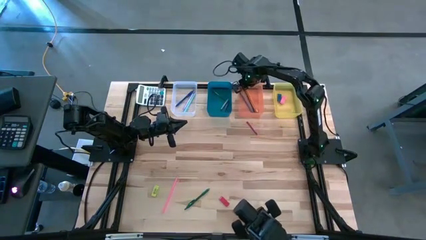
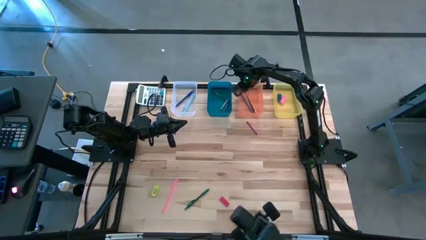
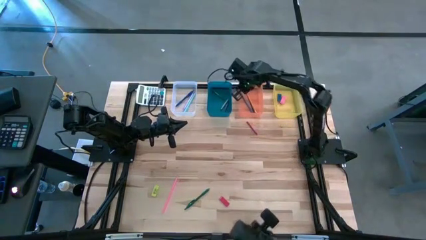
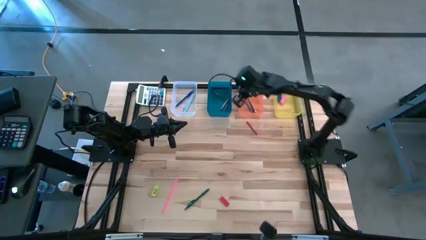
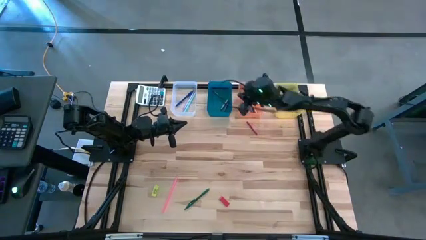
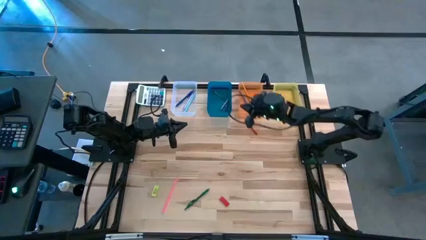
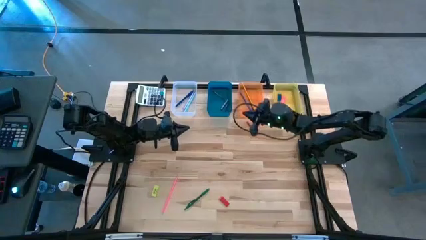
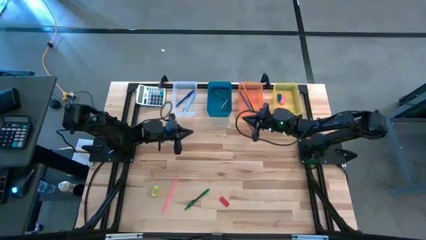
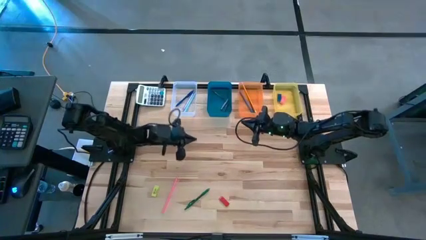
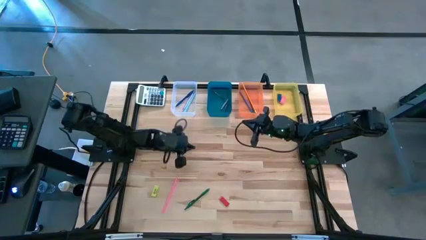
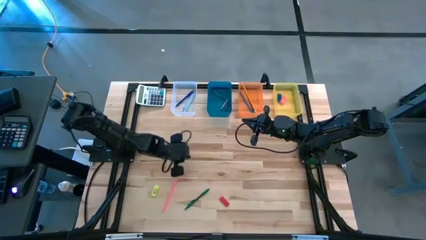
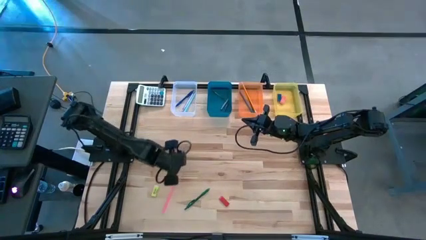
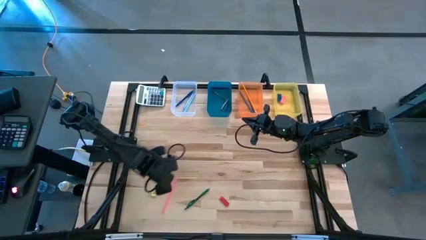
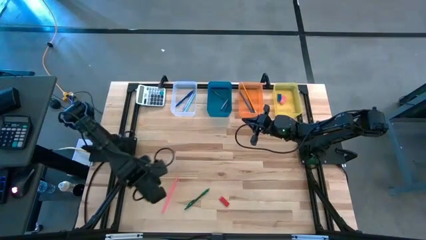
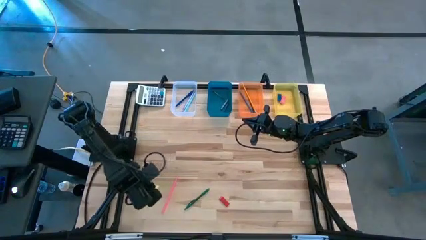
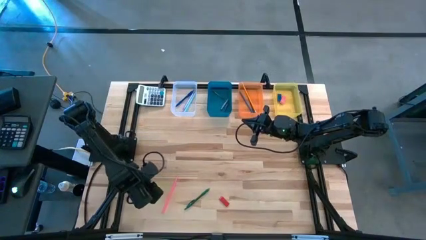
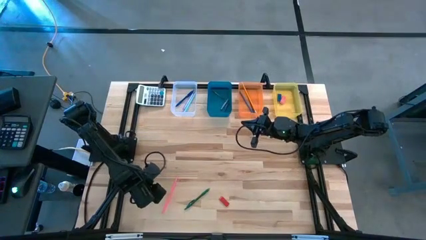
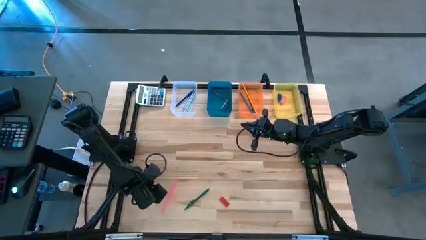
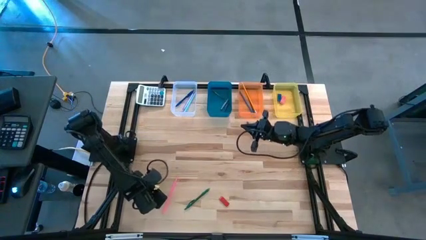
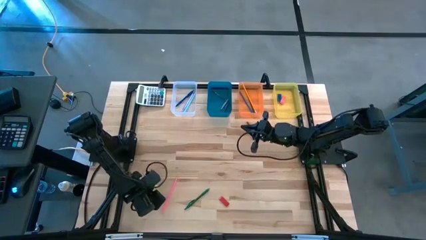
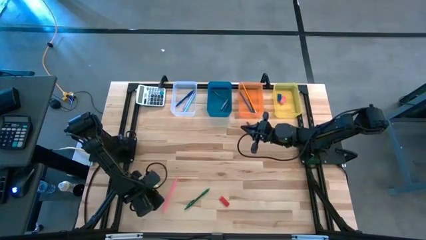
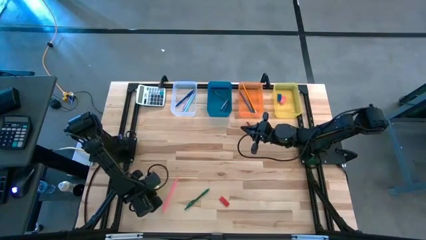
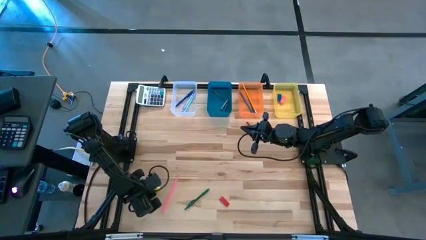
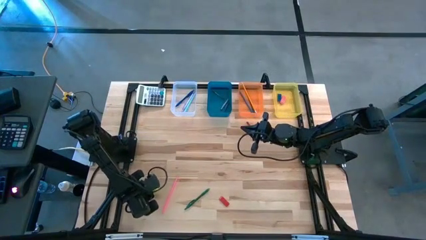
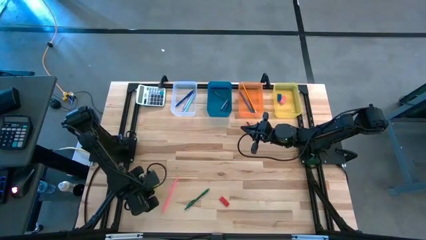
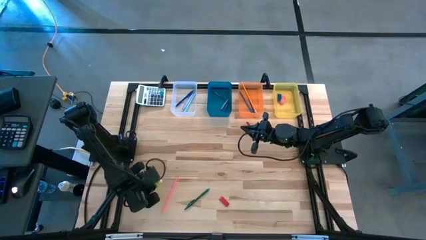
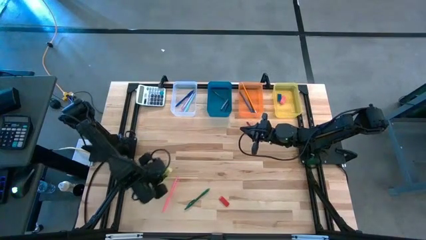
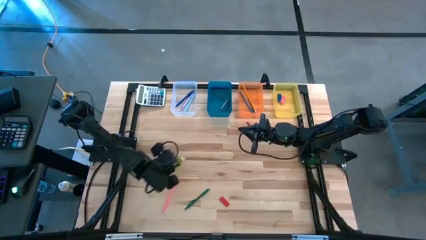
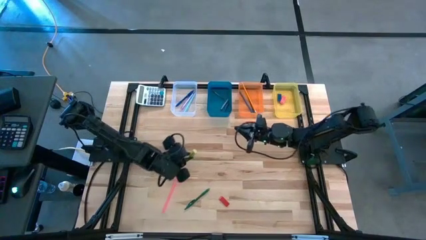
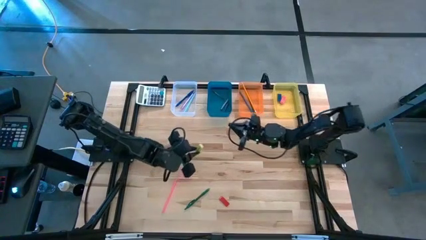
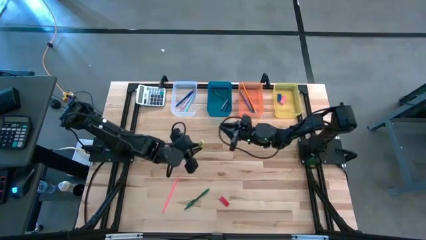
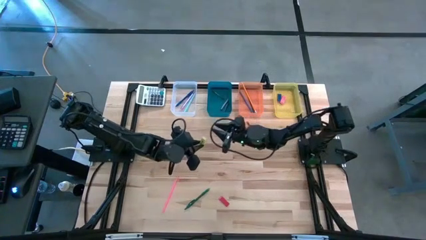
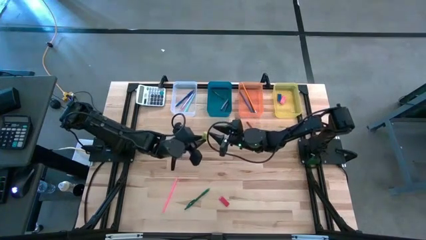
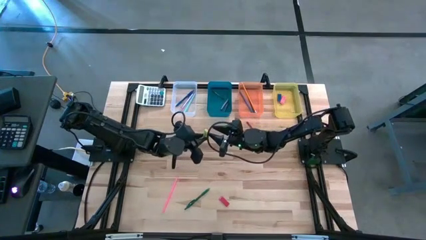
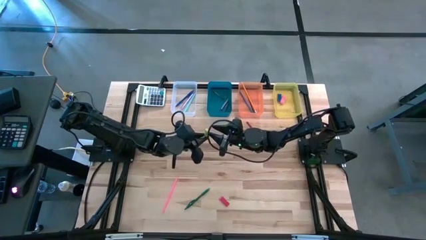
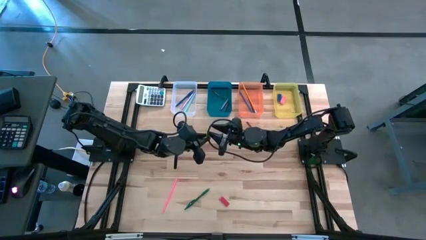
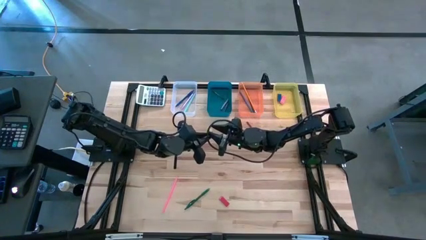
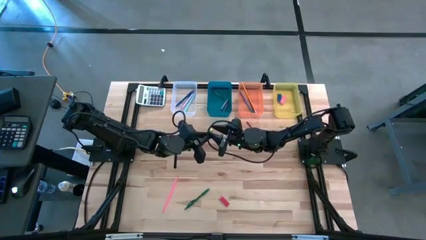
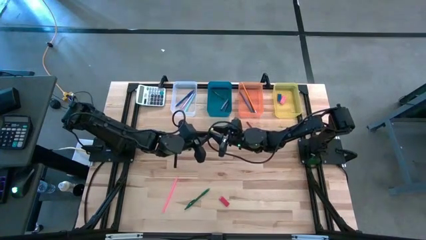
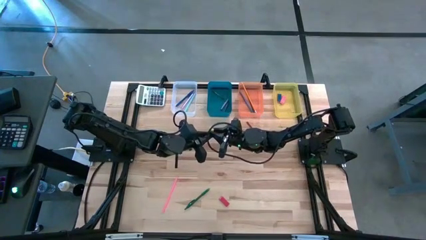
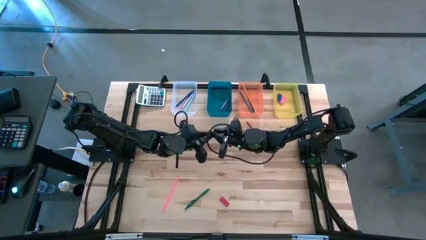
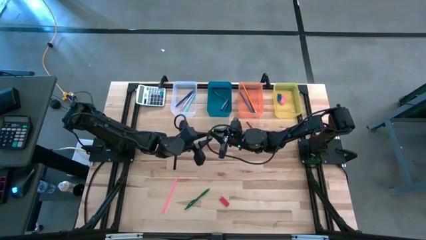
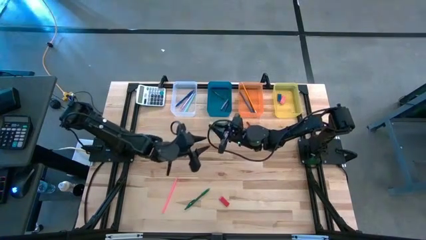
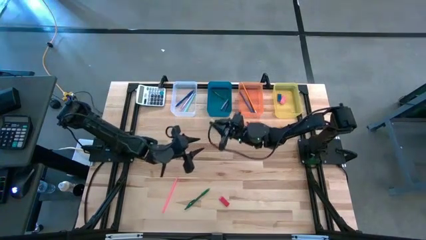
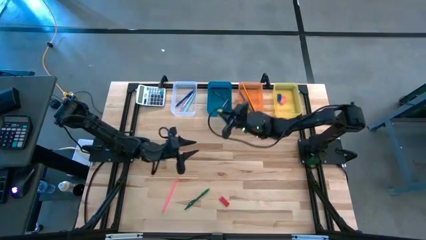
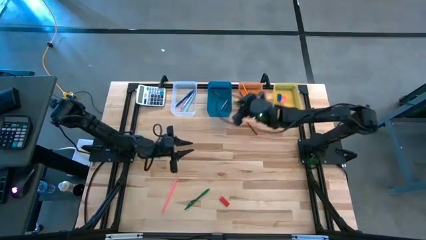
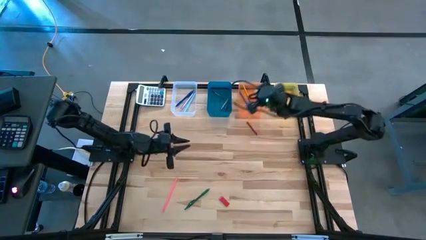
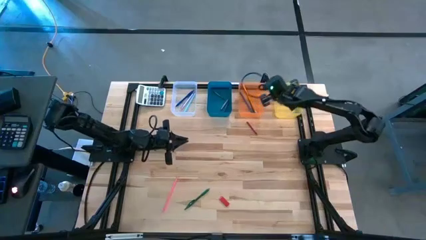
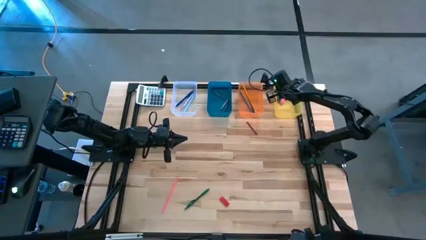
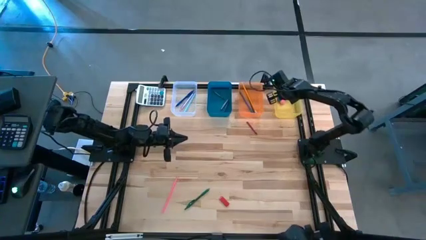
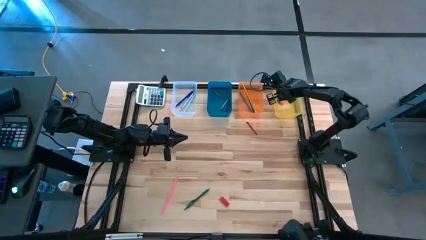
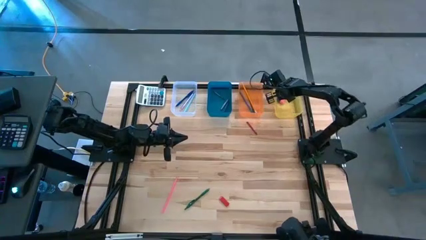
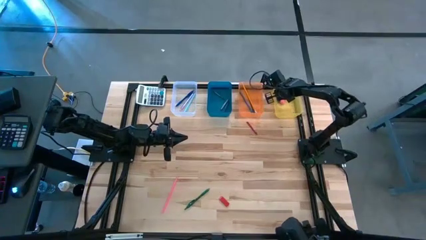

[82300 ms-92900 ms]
Task: Sort crayons/erasers/pens/pencils in bins
Put the yellow eraser into the yellow bin

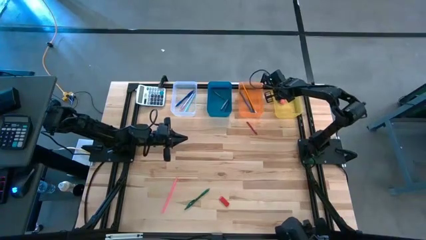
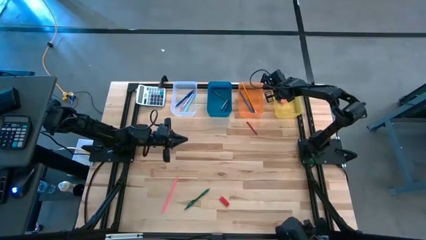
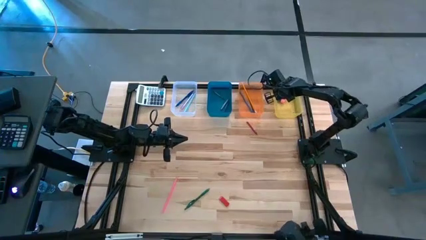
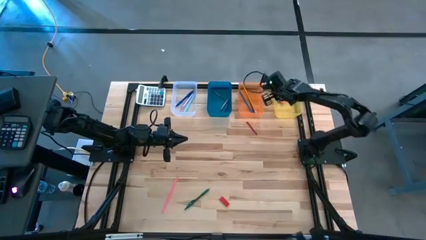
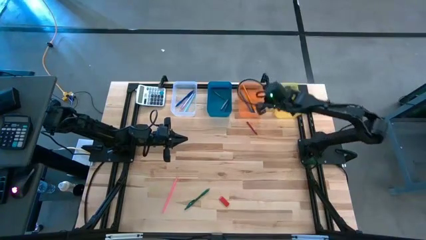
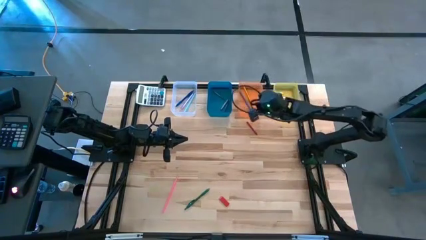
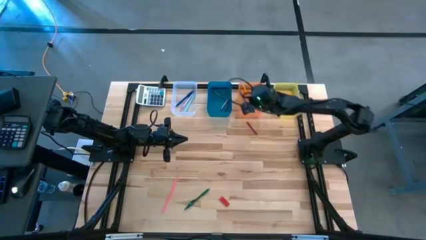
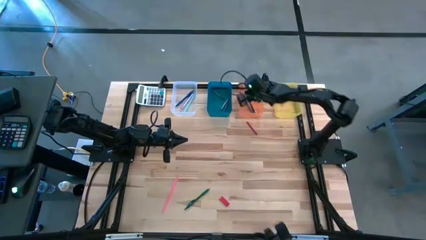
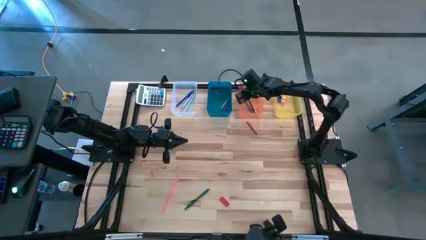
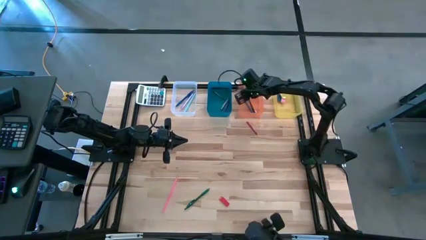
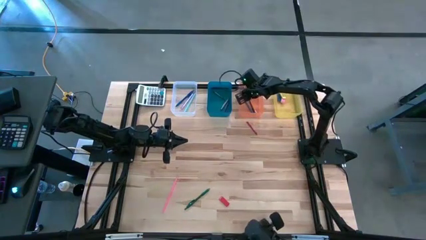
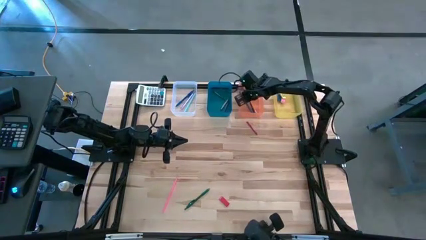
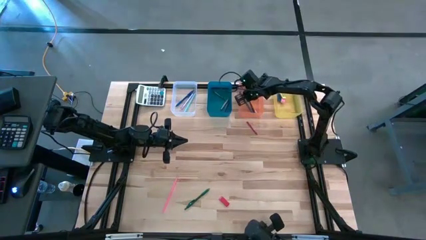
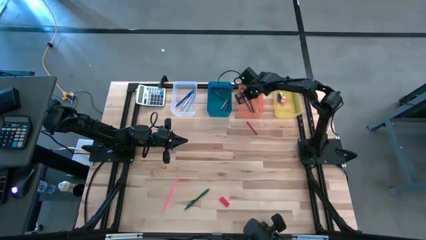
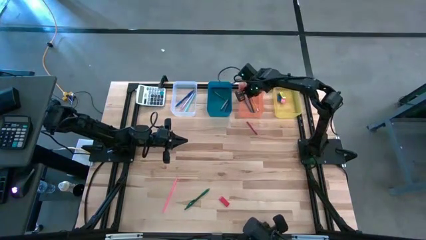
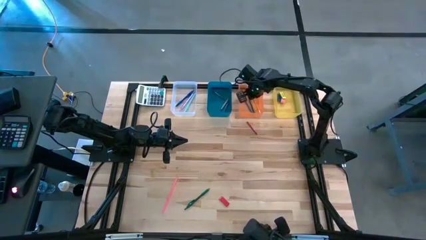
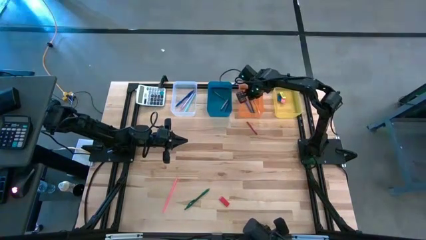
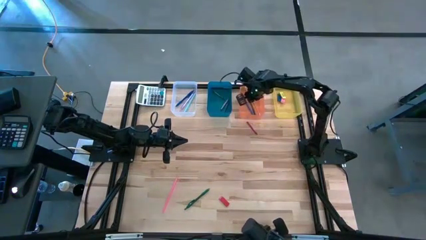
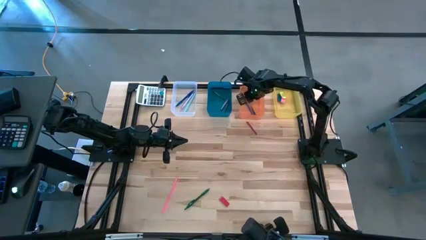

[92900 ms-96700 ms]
Adjust the orange pencil on the orange bin

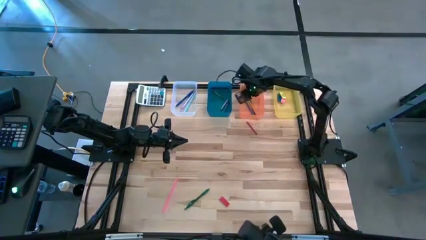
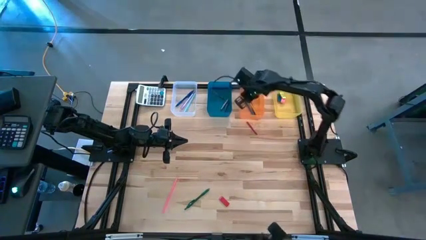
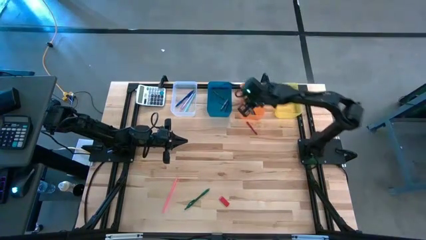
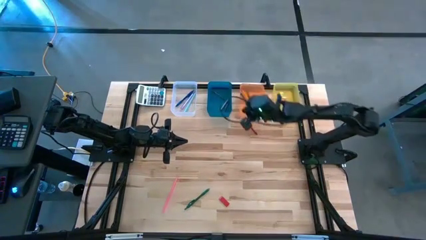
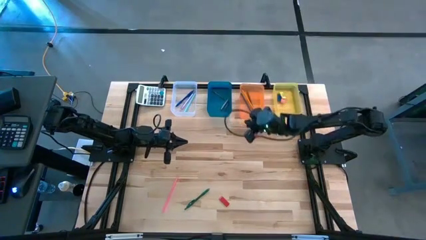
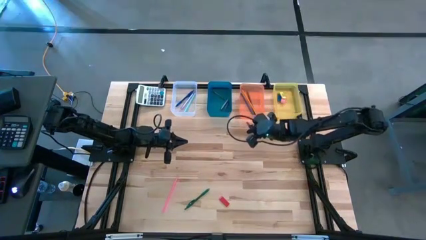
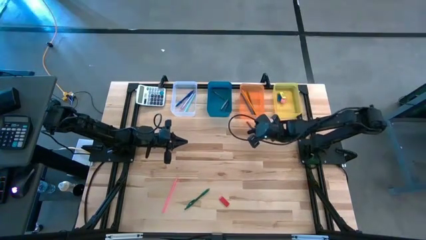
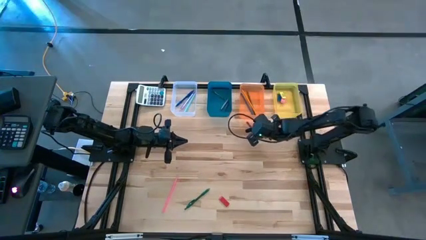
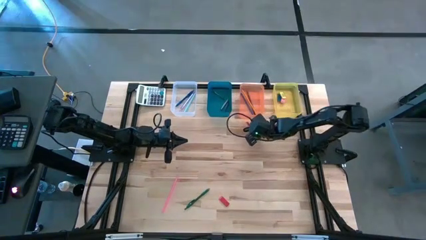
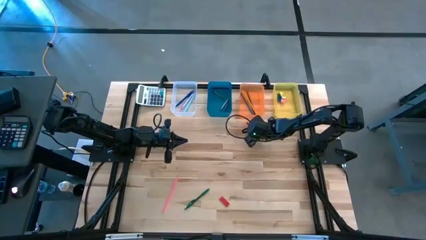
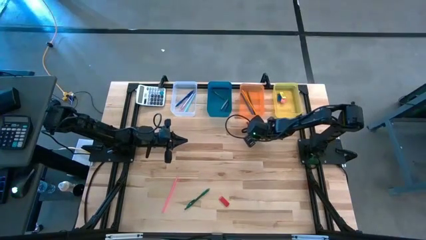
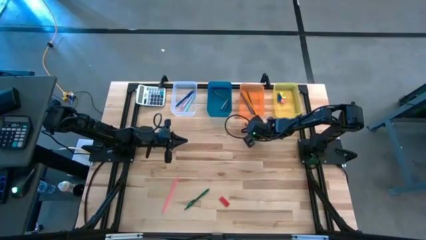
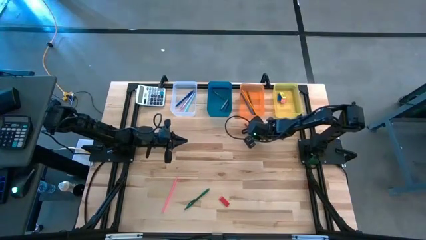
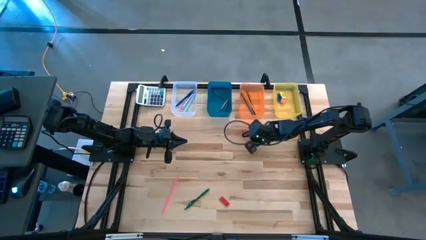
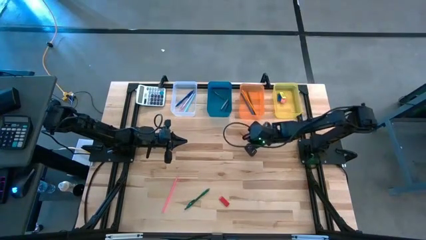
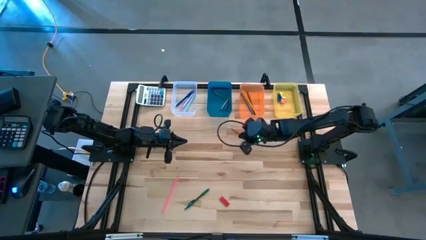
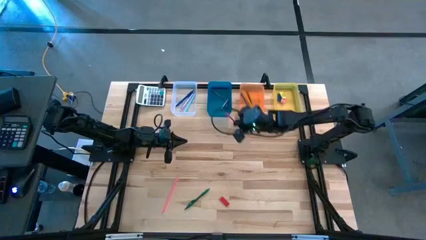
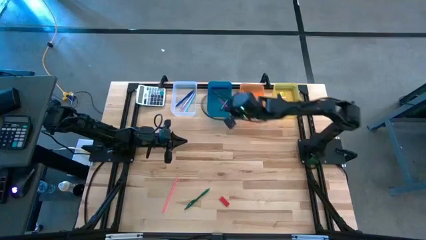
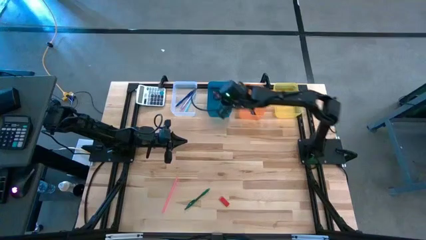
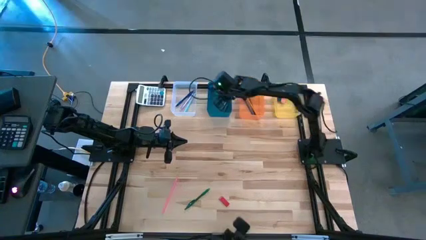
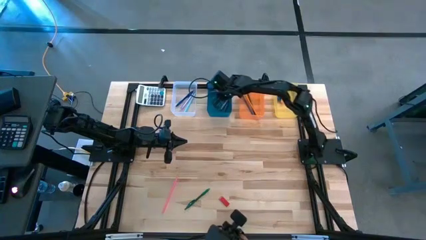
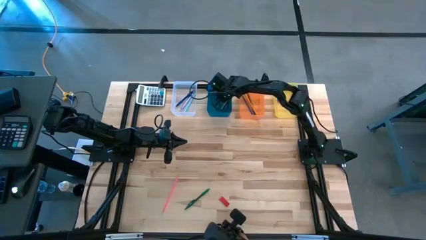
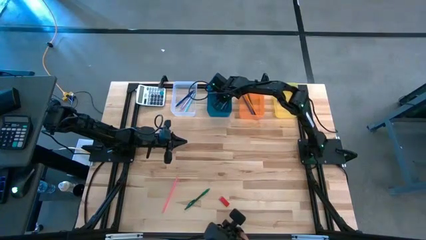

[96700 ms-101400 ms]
Put the red crayon into the blue bin
